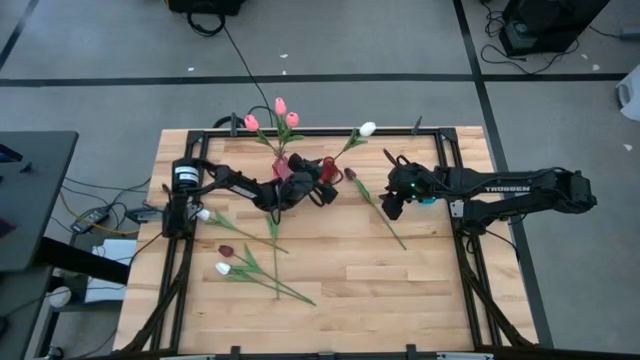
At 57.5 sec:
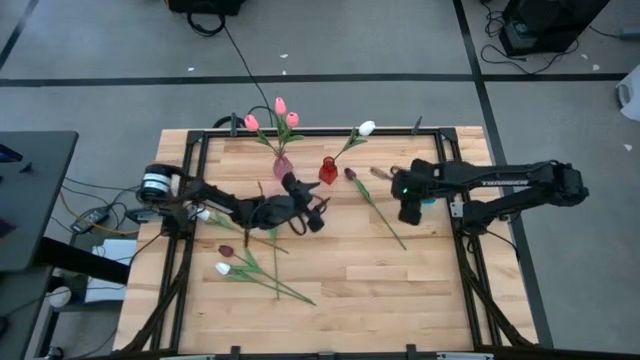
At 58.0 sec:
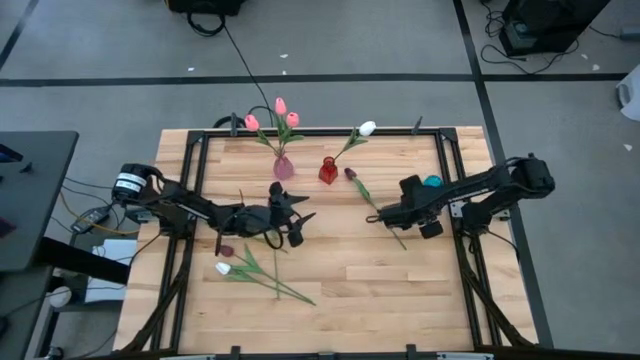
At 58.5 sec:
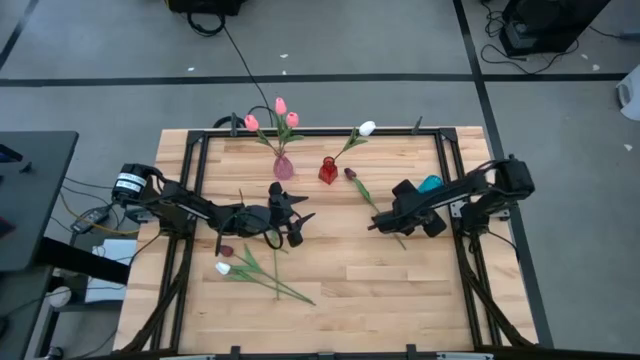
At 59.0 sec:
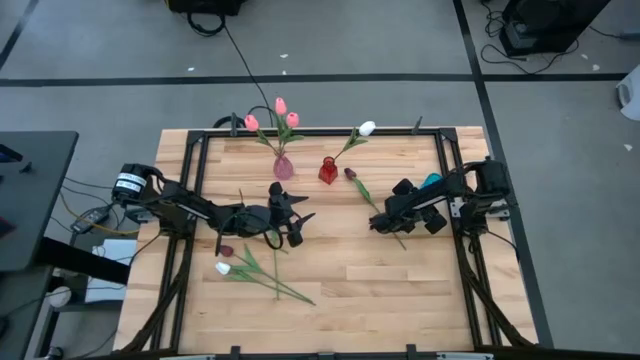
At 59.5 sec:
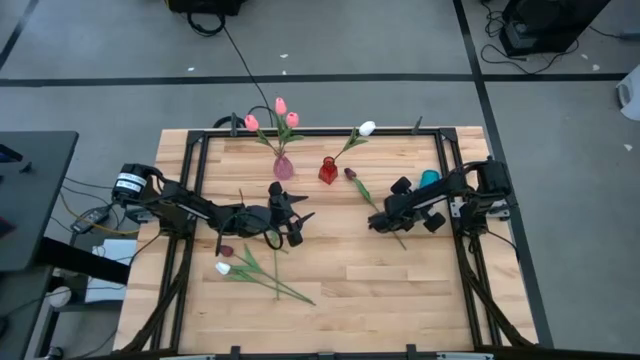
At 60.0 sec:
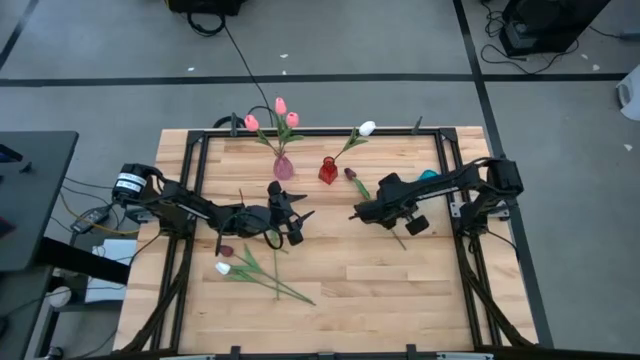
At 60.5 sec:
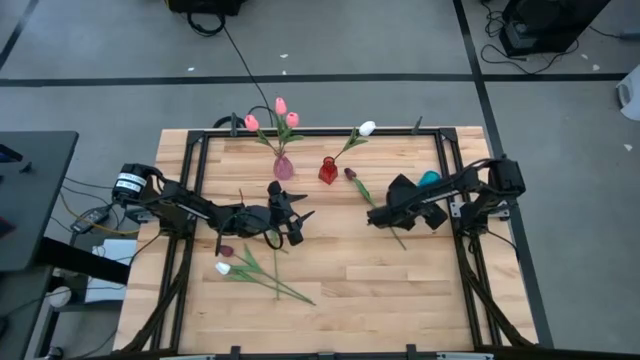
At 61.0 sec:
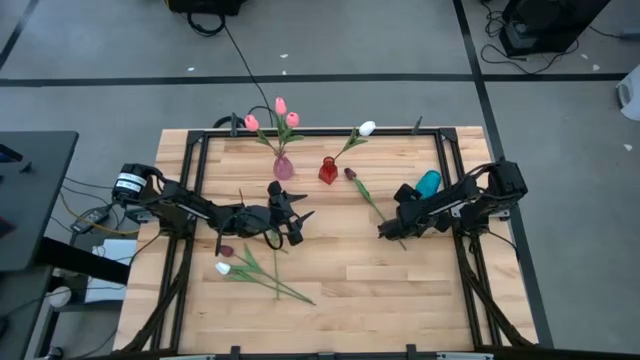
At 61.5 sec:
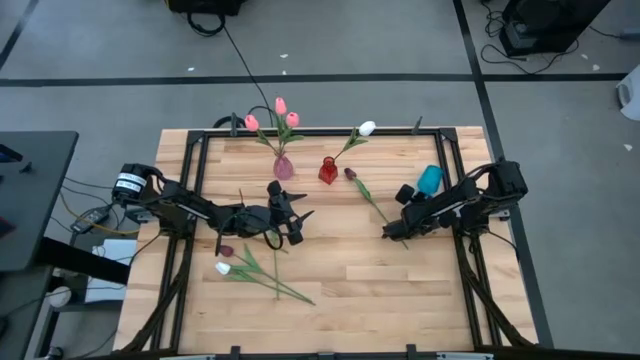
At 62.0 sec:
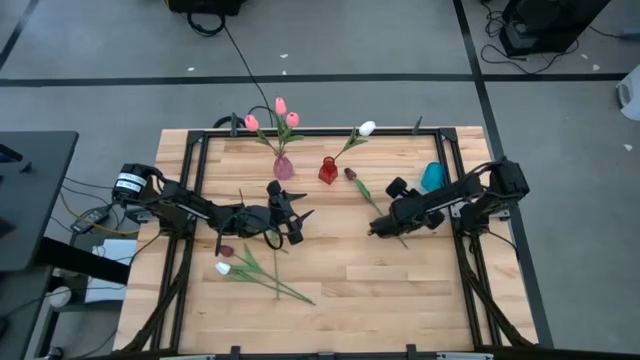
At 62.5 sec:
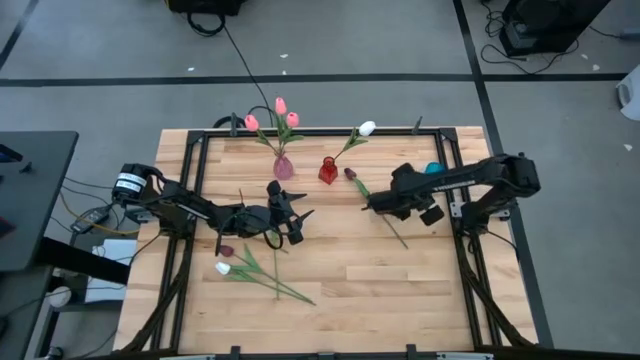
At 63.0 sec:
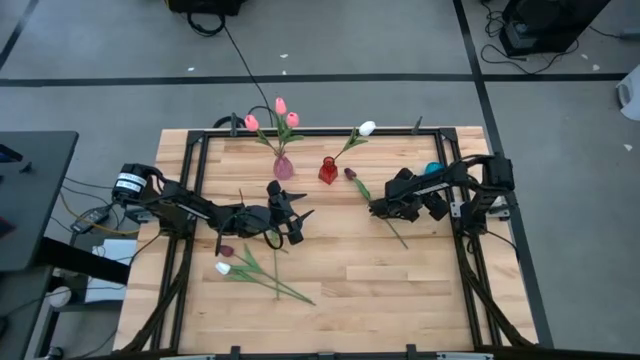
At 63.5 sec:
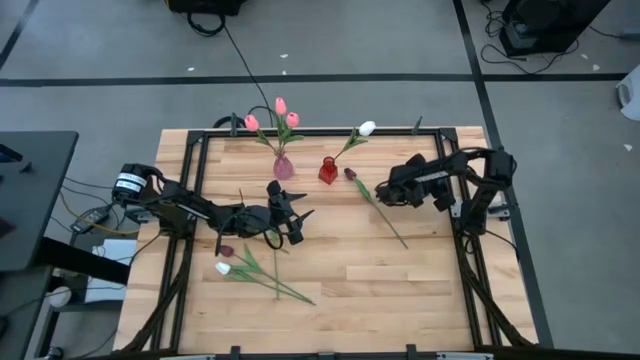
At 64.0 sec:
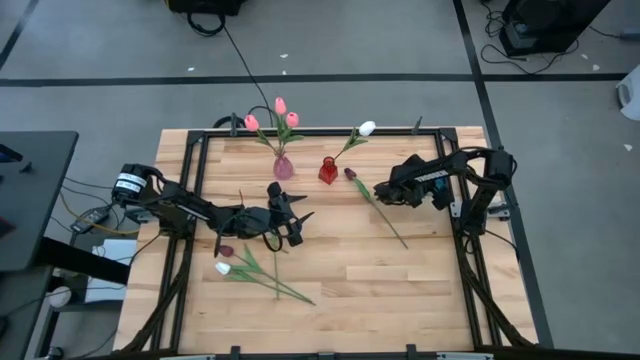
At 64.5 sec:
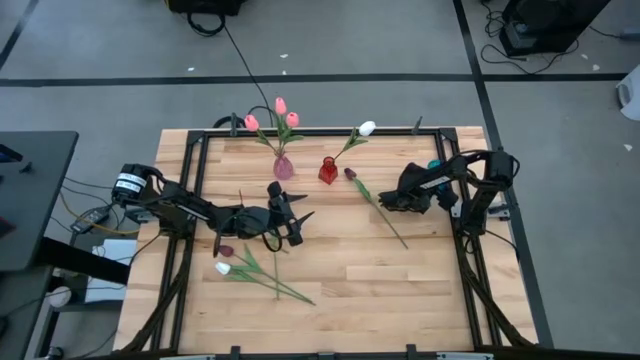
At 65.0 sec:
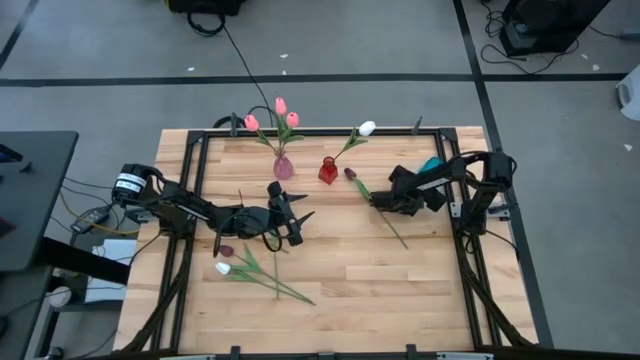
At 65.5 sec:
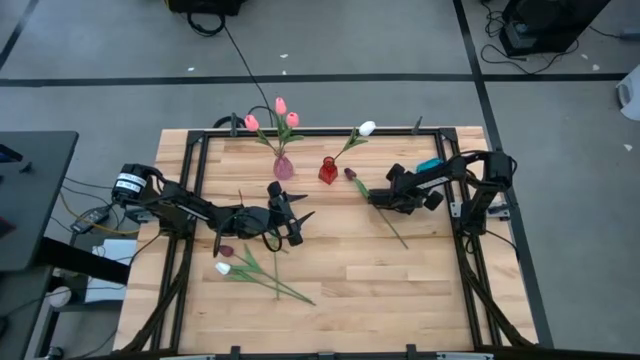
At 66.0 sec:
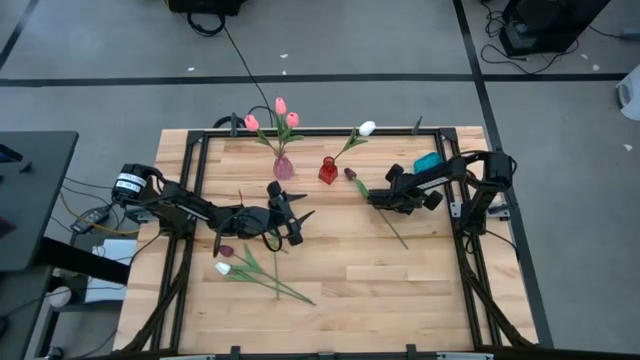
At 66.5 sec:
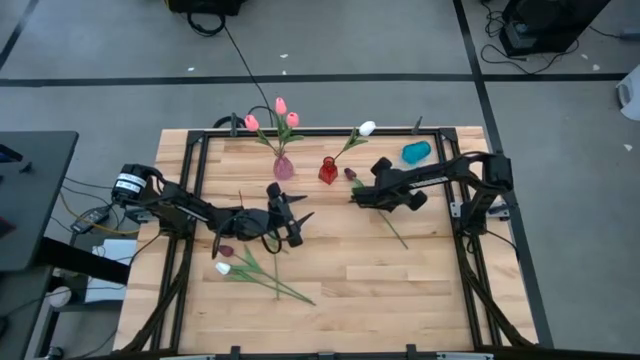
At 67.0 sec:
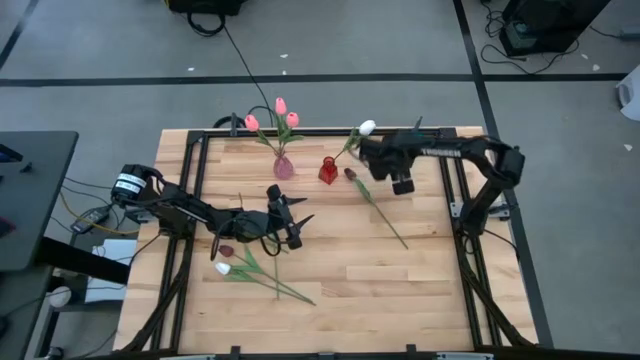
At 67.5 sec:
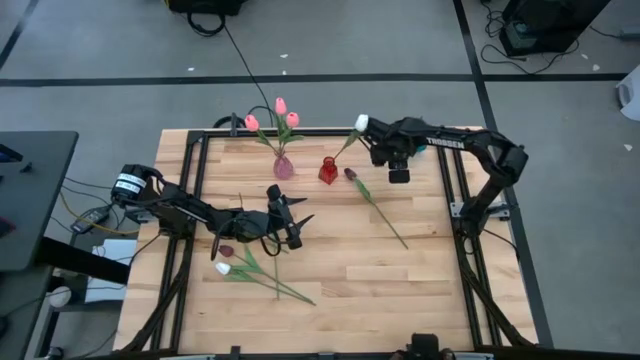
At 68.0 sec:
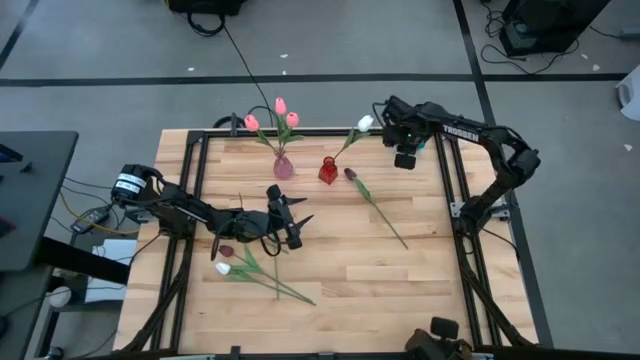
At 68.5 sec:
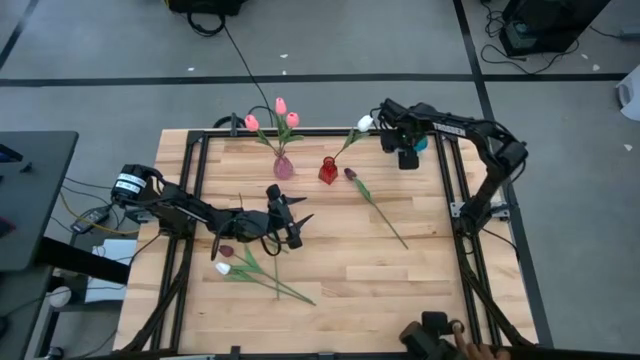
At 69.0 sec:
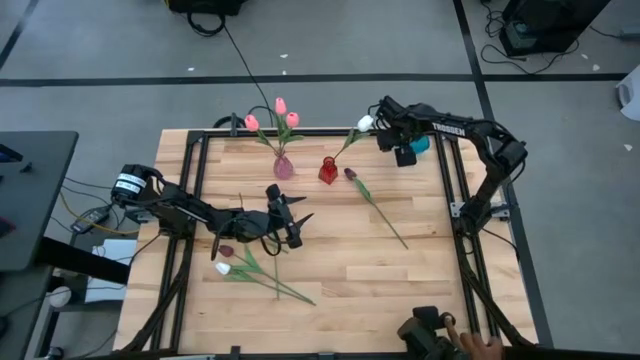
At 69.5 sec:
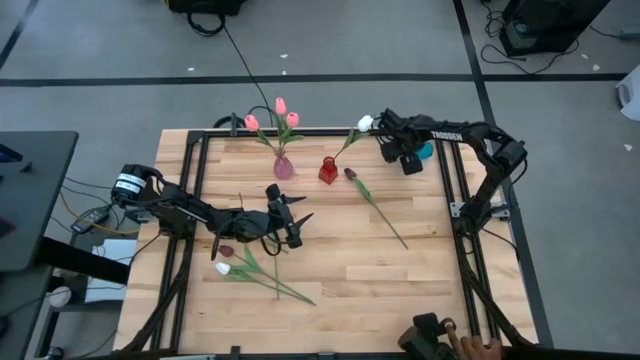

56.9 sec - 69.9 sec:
Task: Sort flowers into vase by color
Move the blue vase to the center of the table

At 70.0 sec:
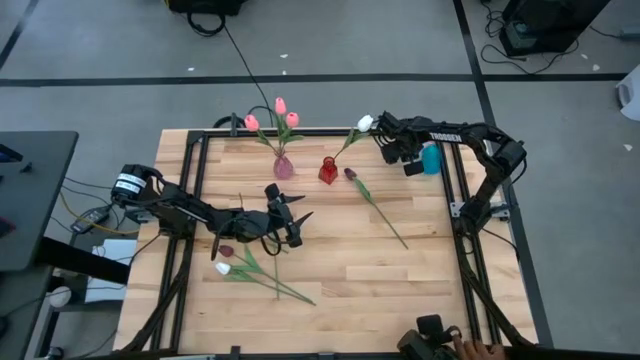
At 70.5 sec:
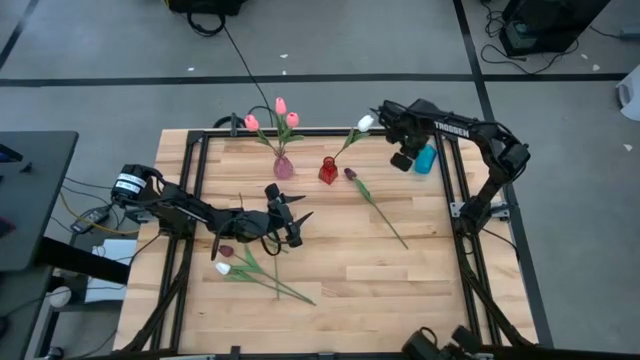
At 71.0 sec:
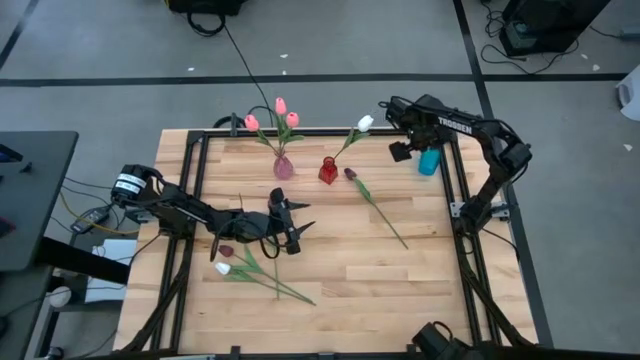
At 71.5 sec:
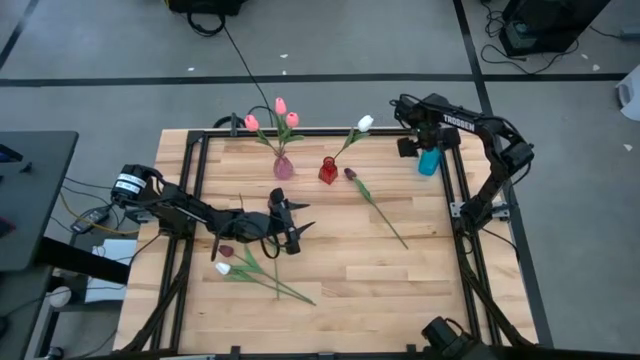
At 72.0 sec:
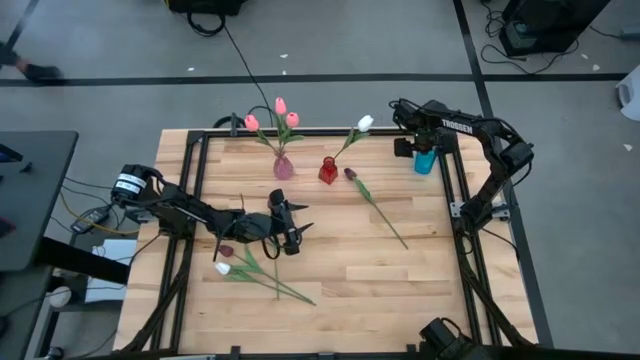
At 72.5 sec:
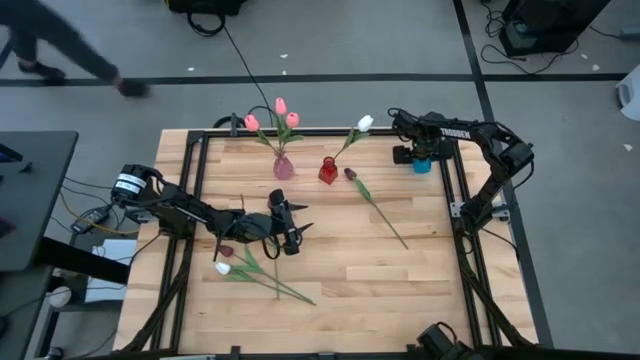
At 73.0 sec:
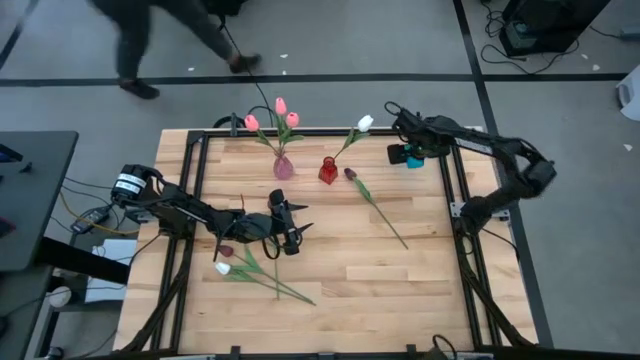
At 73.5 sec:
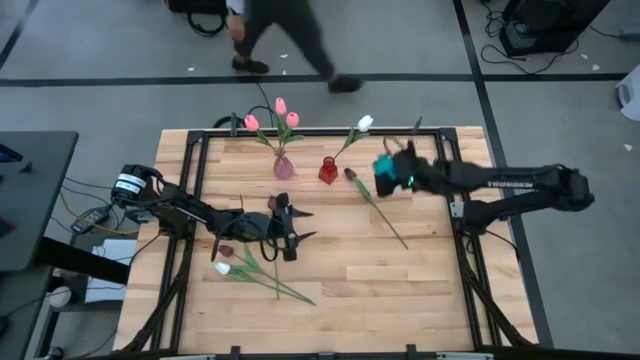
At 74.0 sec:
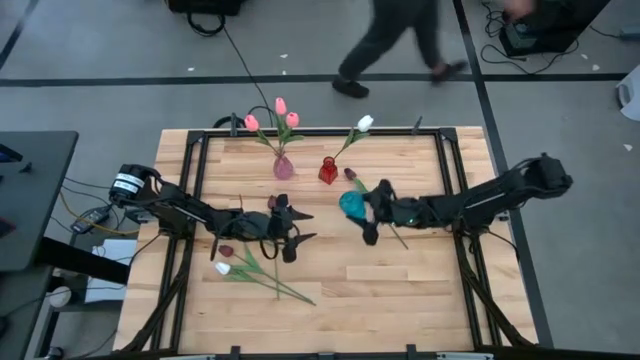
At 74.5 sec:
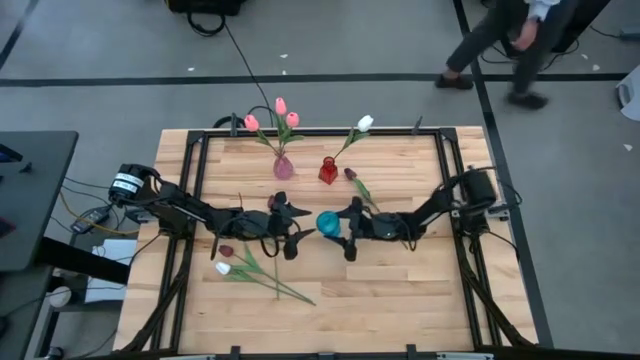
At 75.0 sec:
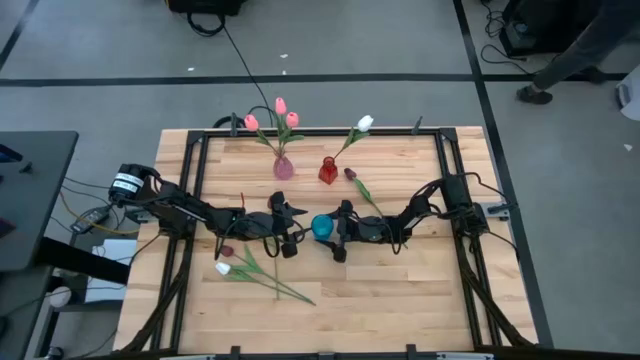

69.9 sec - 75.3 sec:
Move the blue vase to the center of the table

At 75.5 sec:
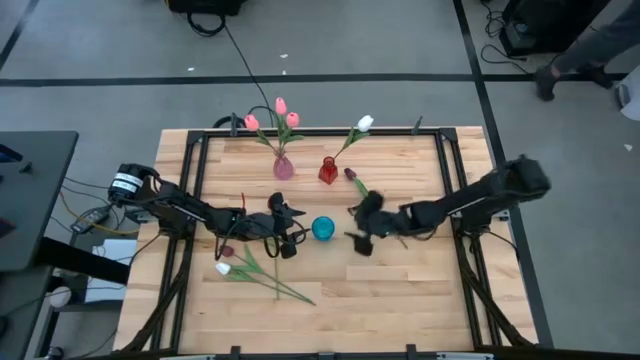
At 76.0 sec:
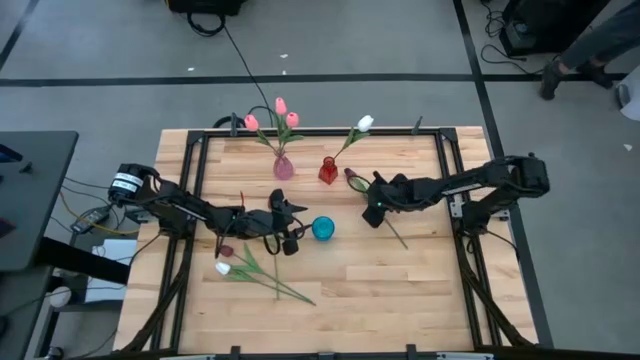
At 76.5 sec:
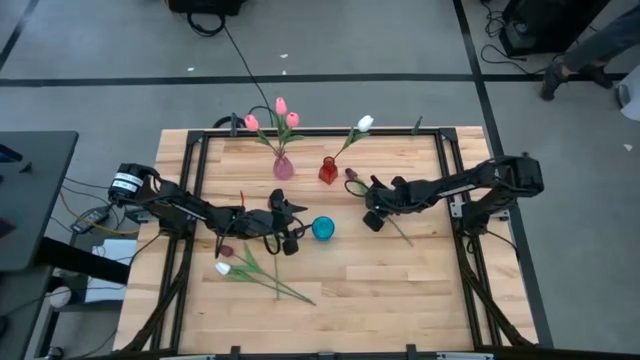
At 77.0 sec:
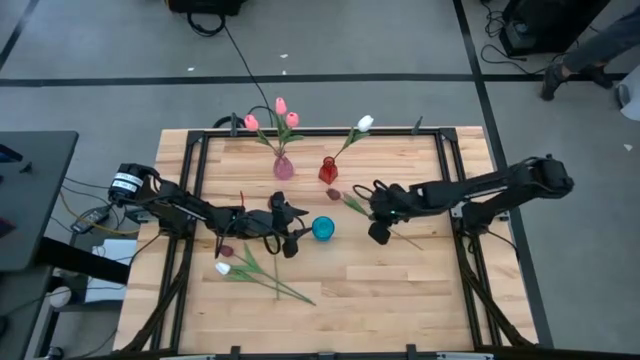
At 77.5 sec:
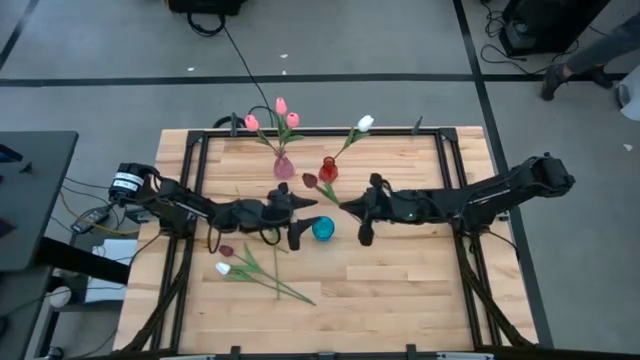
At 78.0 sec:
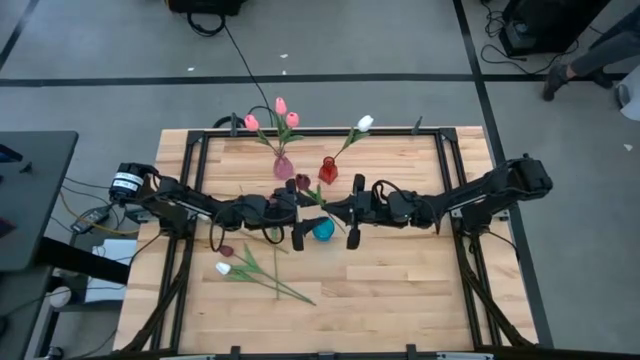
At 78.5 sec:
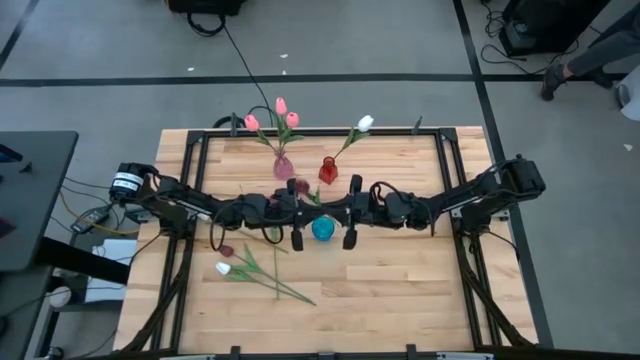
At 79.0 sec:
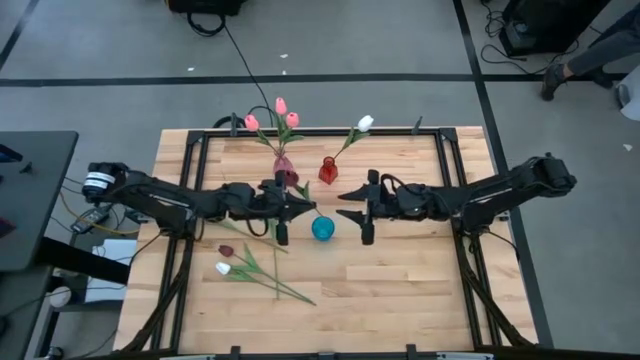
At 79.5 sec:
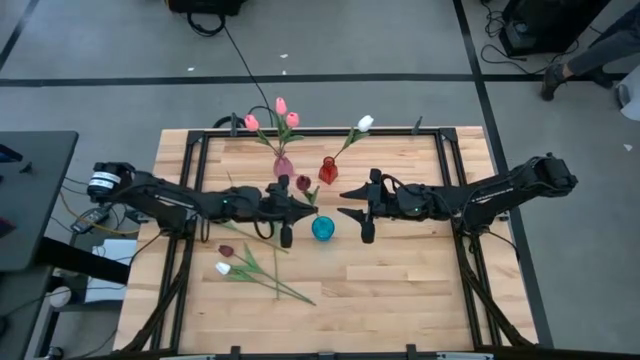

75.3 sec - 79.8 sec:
Put the top red flower into the blue vase
